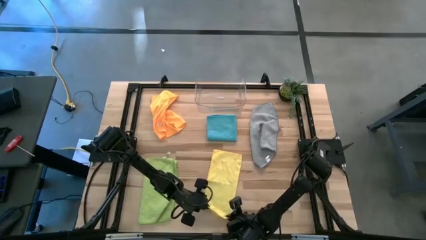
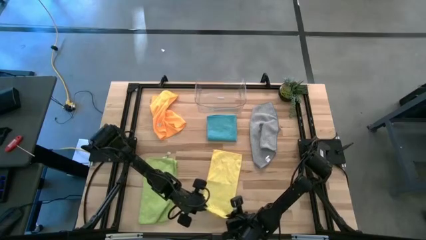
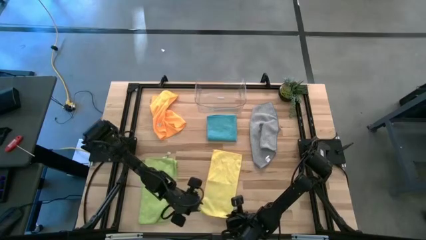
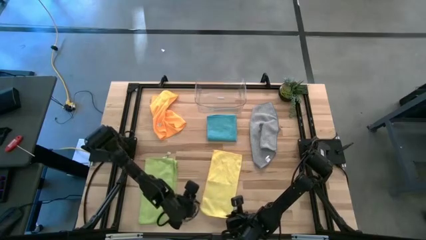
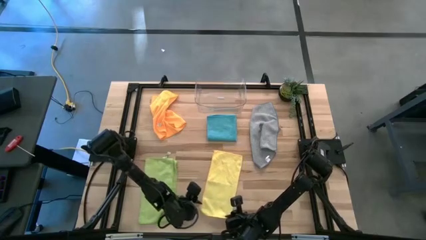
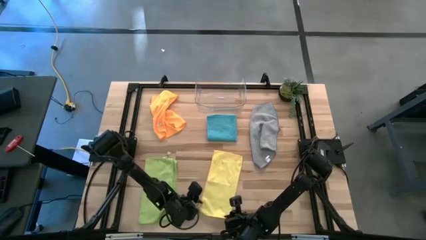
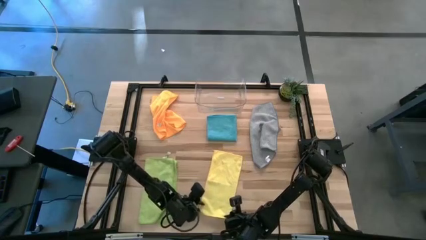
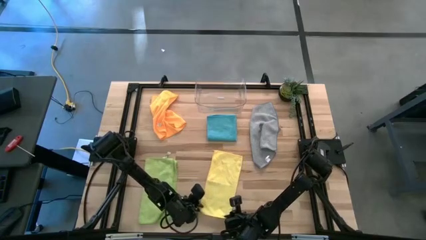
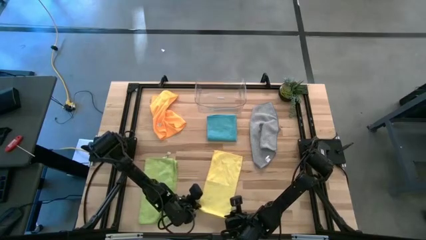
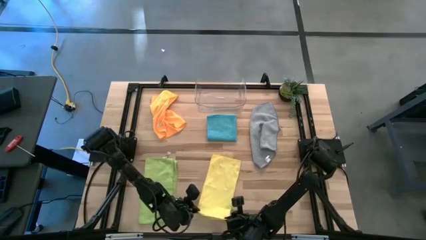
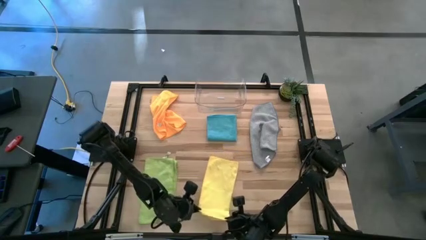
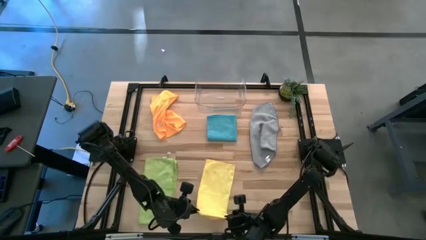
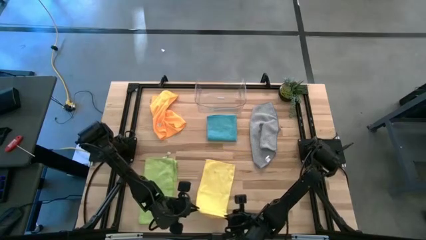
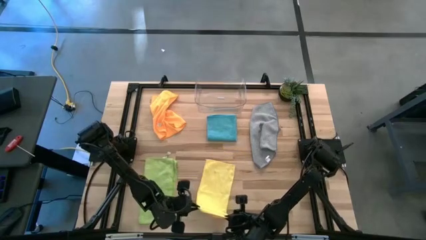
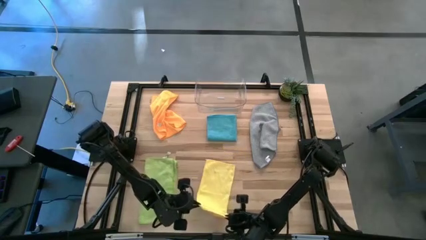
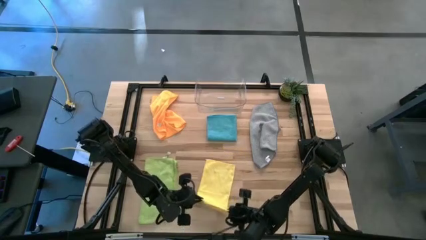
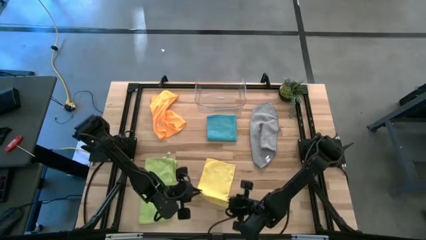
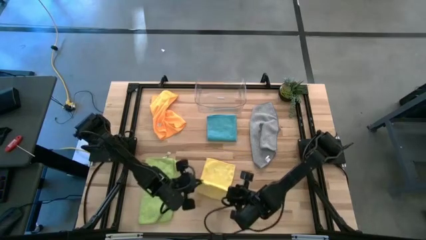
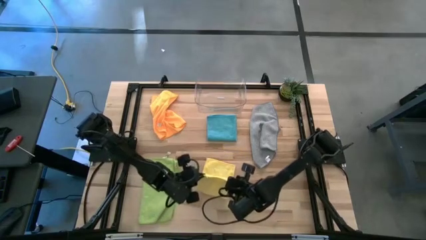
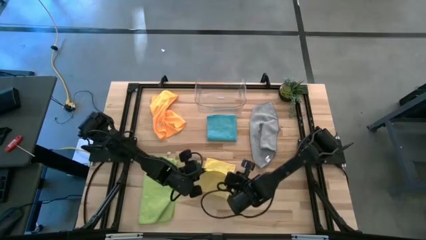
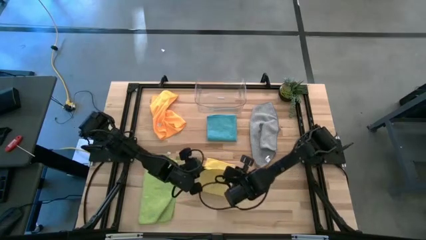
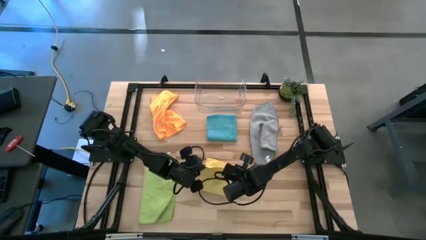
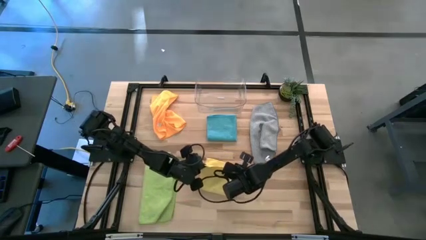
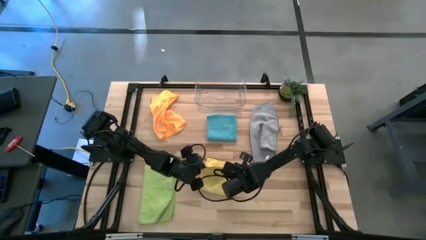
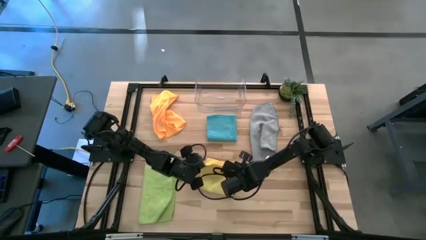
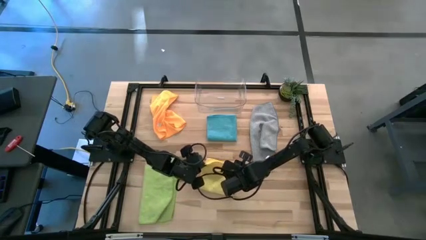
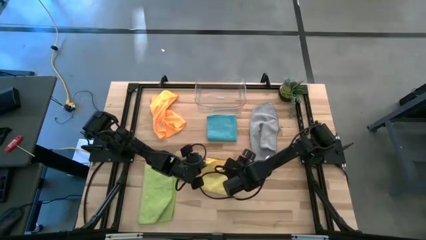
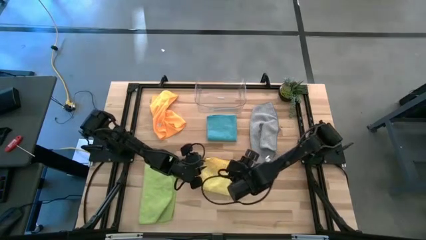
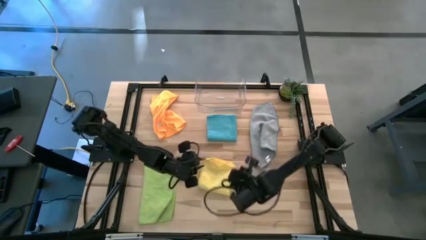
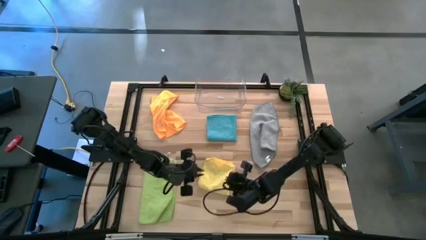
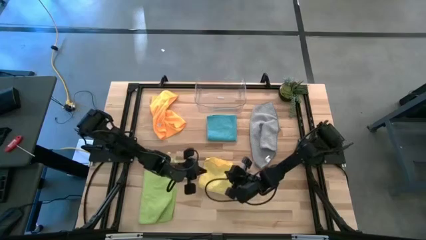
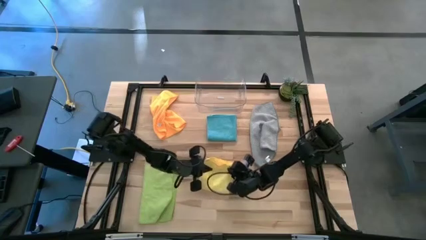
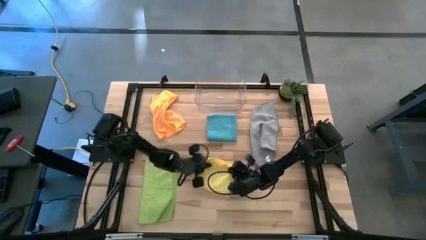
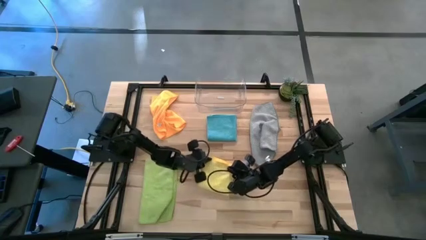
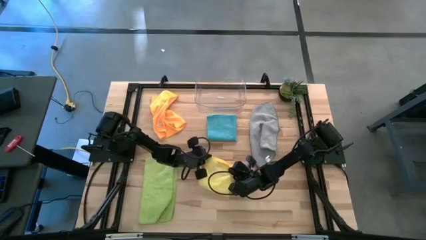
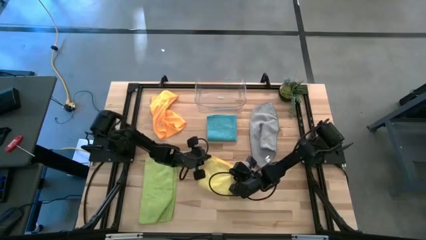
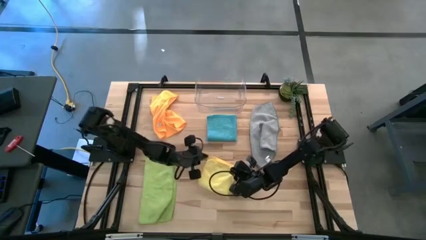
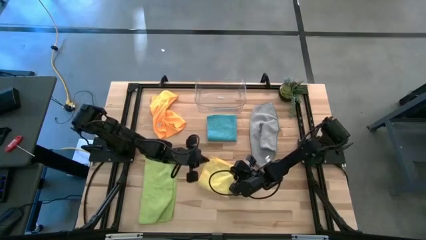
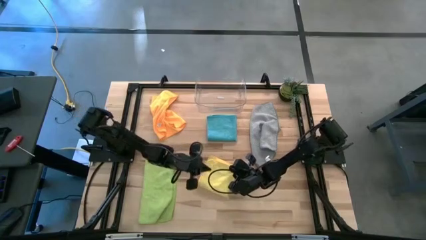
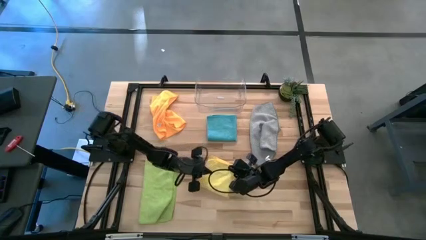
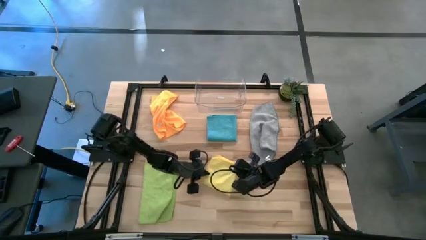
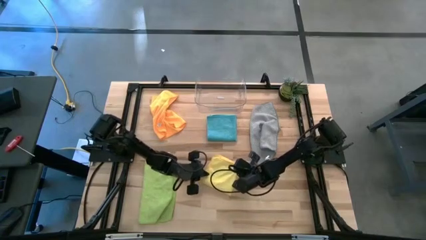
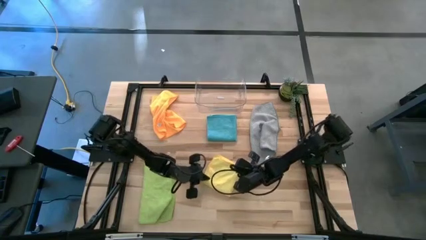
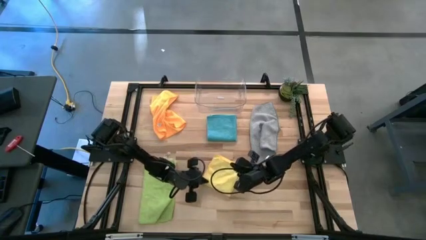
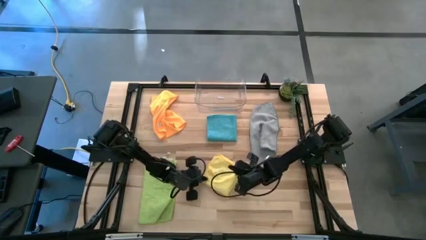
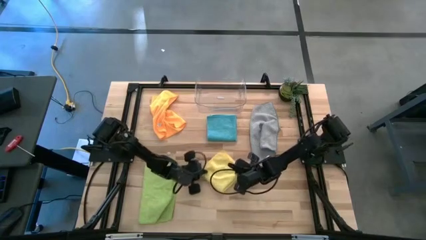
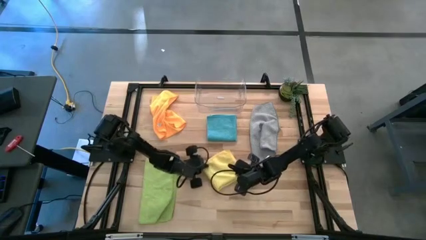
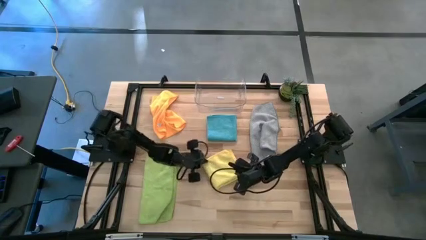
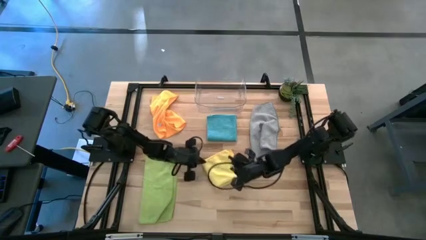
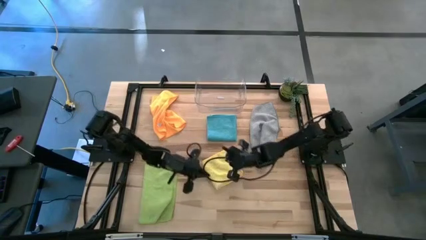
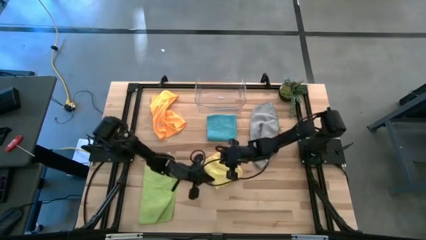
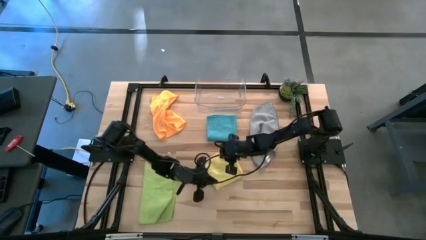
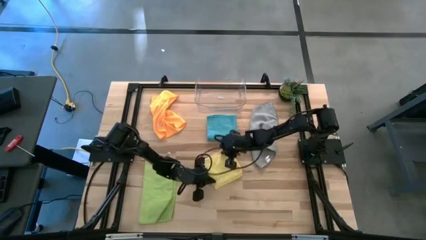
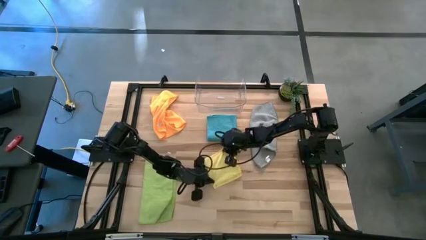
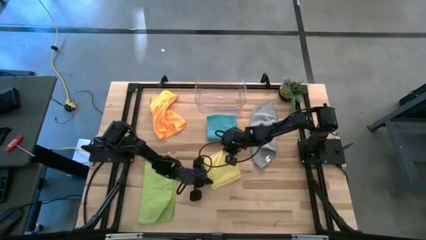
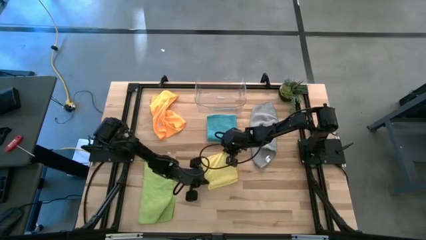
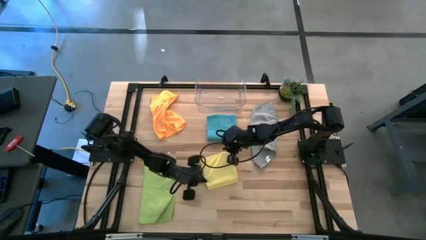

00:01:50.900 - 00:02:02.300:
Task: Fold microfiber towels
Fold the yellow towel on the table
